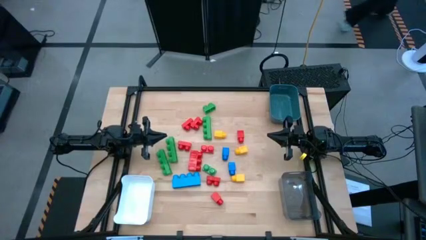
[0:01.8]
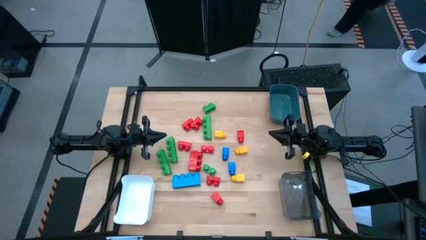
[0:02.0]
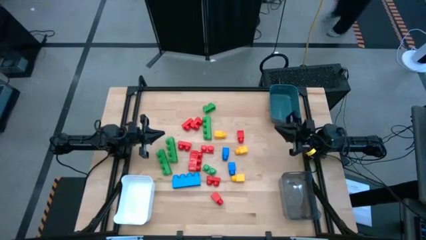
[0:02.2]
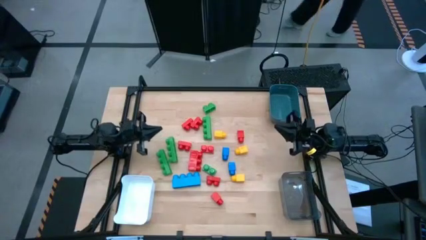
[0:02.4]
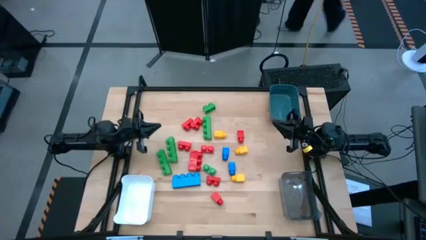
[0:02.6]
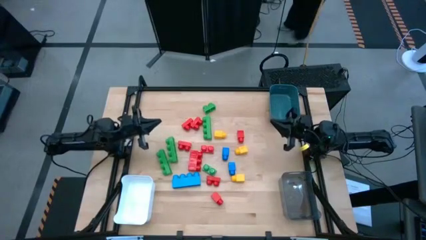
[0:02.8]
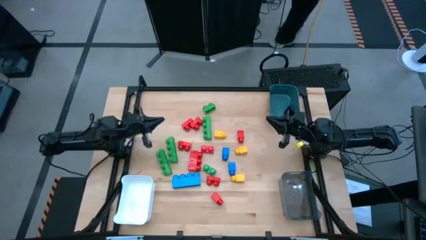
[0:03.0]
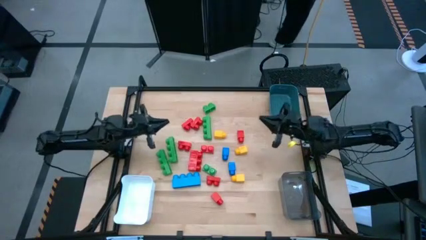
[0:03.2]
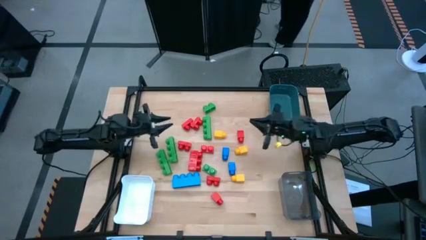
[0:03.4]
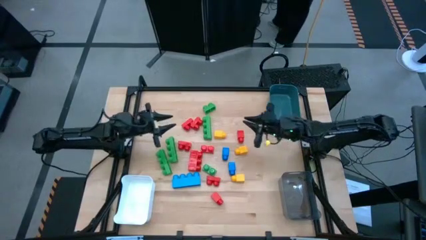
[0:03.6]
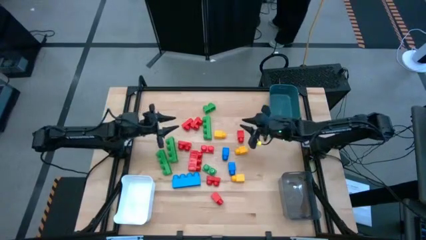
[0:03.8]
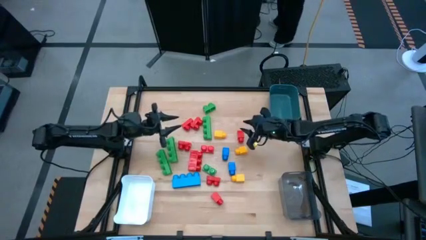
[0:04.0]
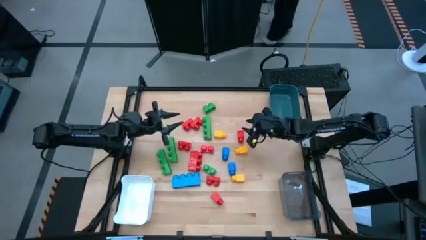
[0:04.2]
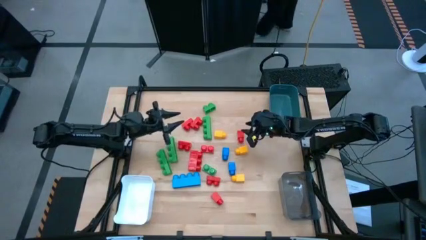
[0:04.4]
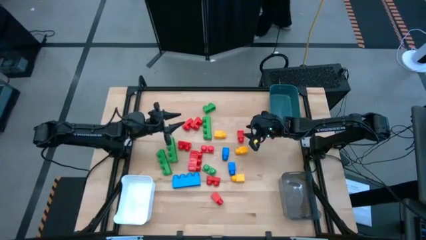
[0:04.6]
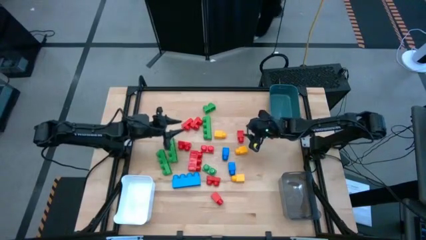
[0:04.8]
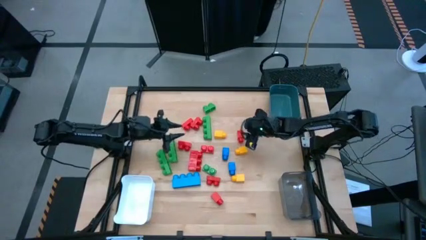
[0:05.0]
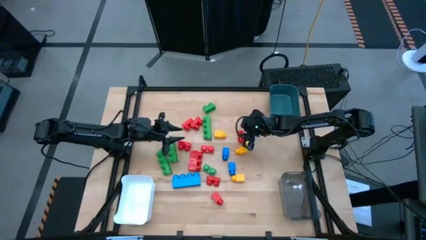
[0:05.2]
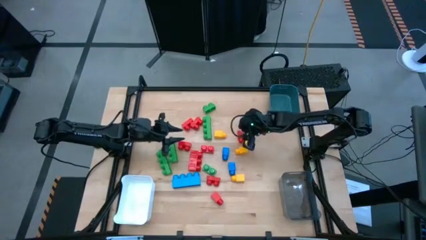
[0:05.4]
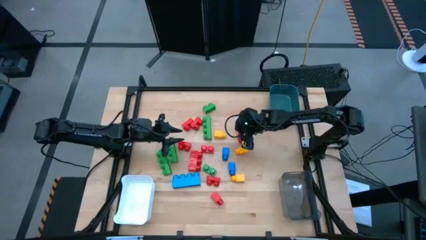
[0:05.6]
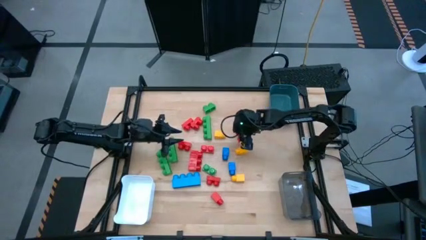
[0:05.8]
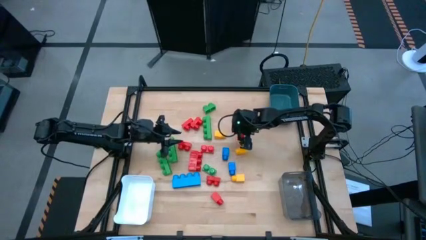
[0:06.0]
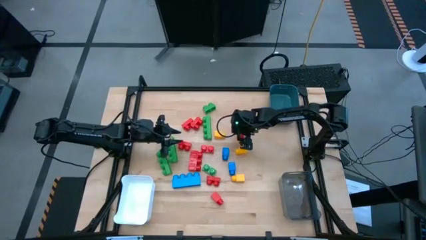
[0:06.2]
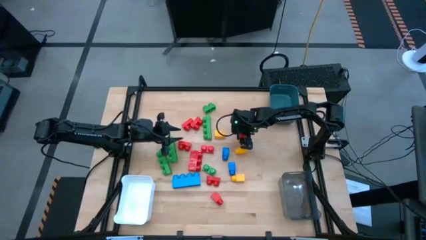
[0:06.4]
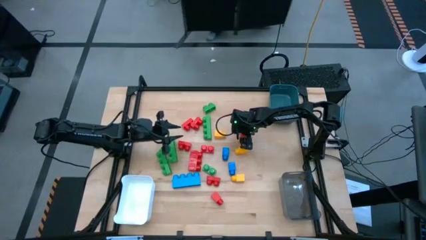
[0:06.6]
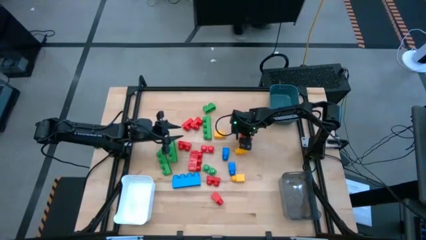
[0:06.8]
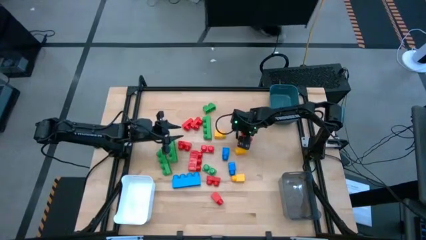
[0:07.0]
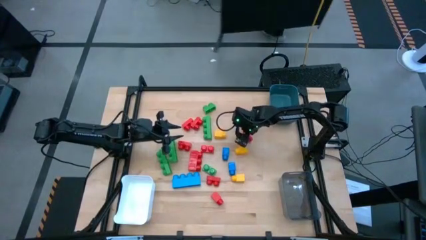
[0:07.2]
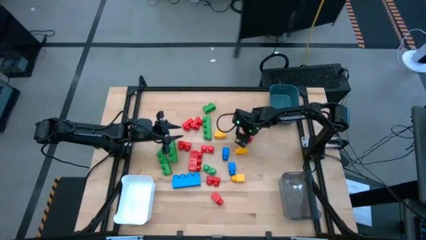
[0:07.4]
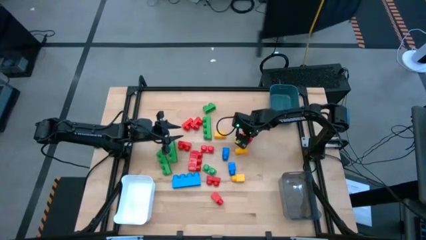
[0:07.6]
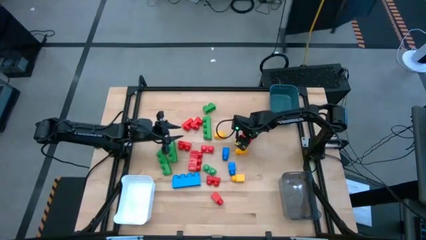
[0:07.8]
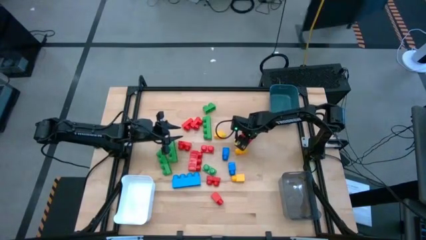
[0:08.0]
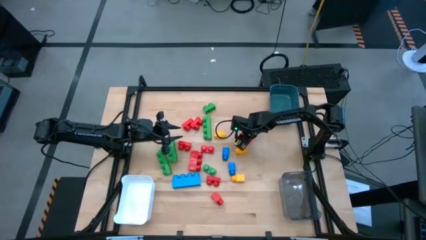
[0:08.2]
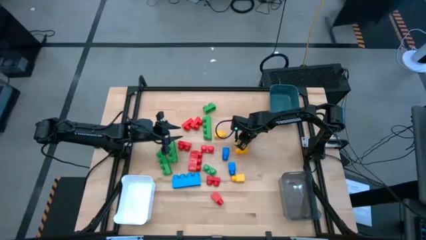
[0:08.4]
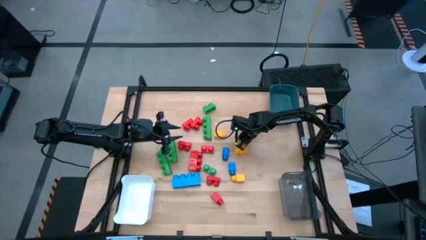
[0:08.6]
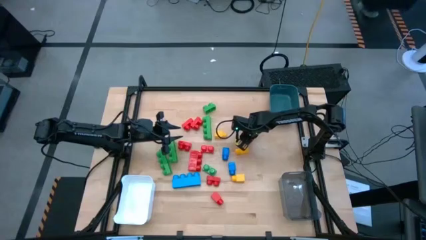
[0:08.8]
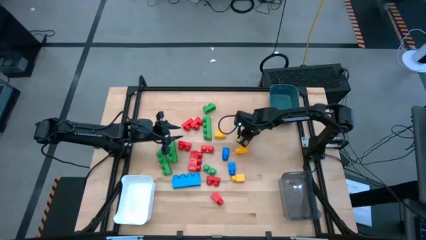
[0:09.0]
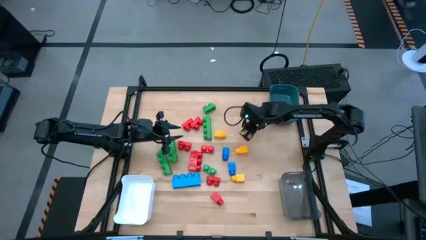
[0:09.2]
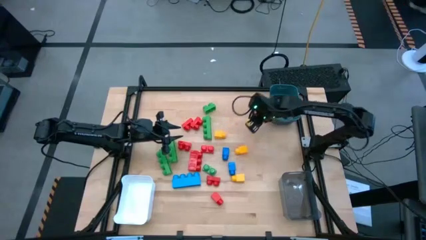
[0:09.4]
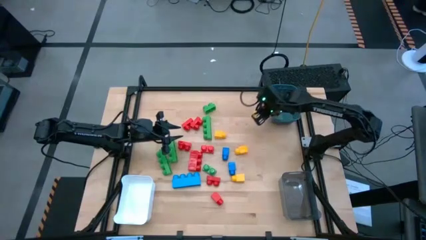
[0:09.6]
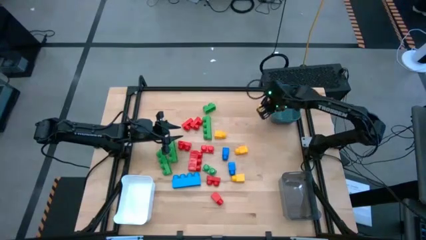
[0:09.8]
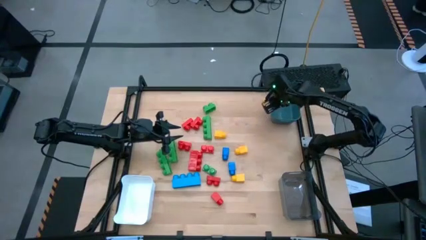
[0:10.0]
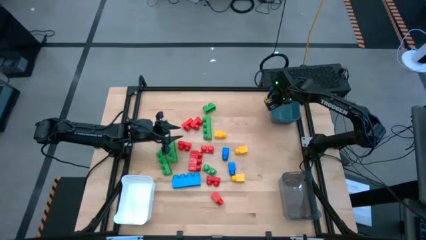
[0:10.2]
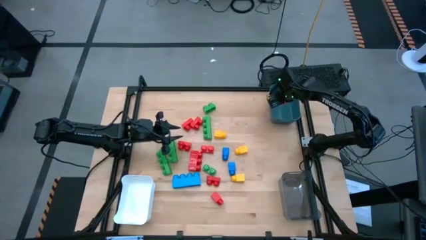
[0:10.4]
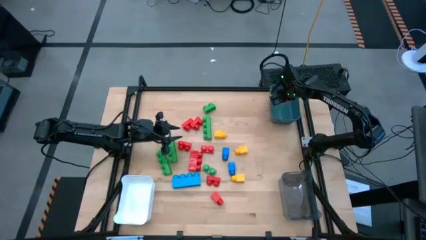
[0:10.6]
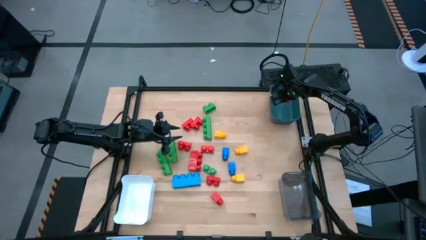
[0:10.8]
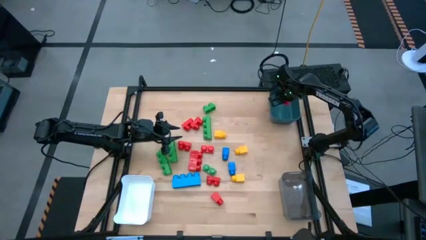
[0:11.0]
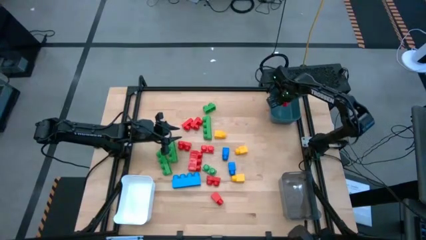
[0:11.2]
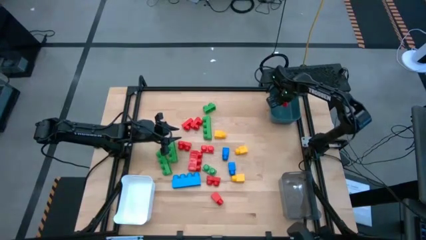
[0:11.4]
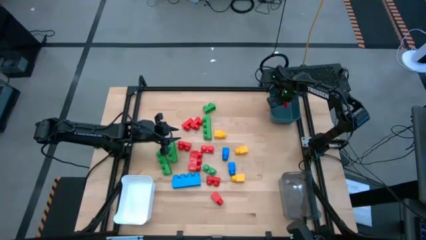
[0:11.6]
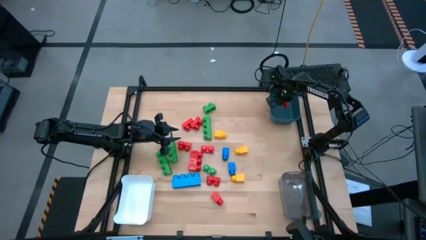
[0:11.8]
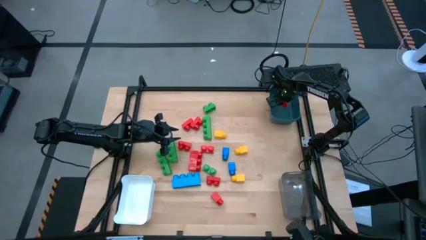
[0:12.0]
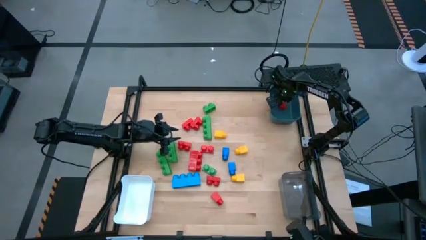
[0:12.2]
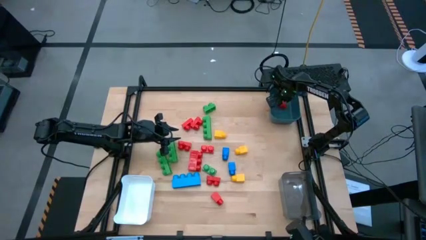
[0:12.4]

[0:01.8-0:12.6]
Task: Sort blocks by size
Put the one stud red game piece into the blue bin

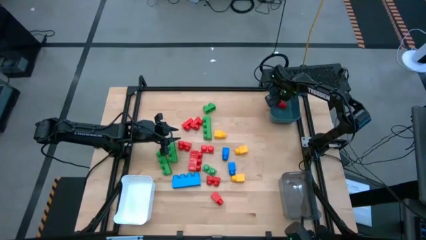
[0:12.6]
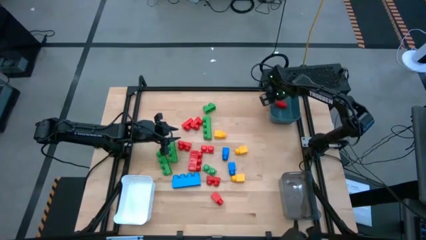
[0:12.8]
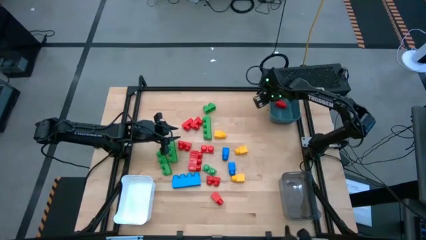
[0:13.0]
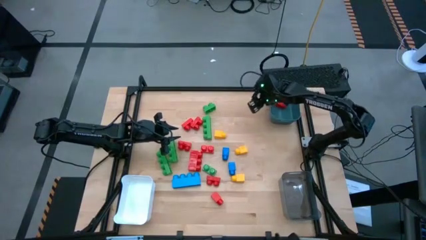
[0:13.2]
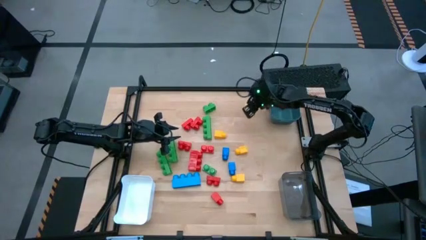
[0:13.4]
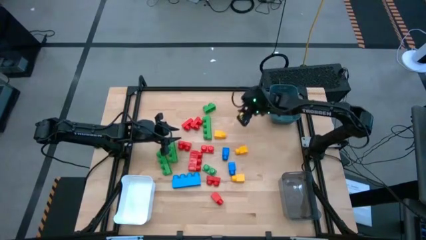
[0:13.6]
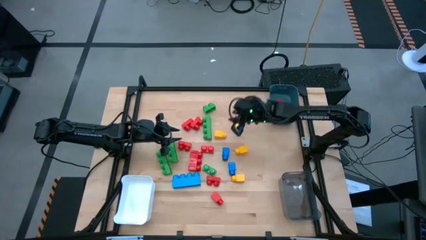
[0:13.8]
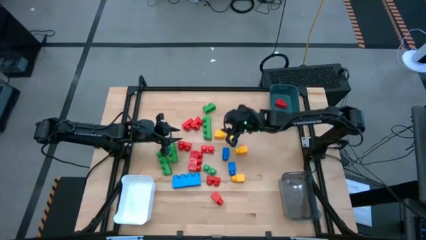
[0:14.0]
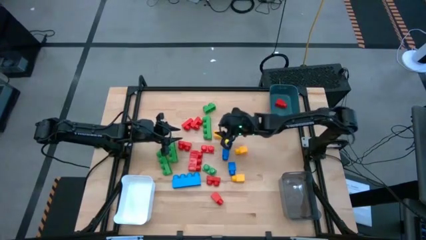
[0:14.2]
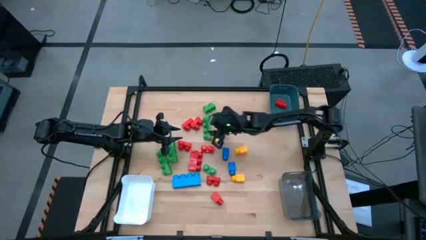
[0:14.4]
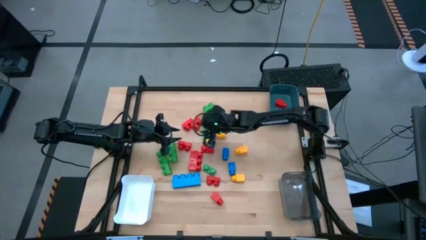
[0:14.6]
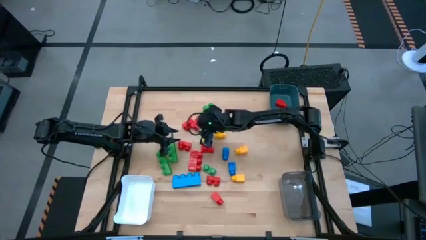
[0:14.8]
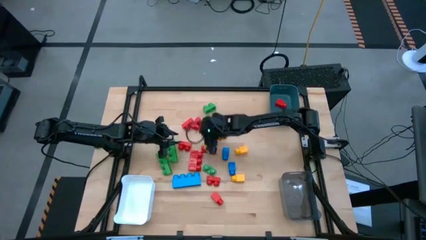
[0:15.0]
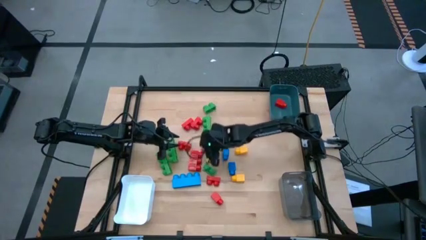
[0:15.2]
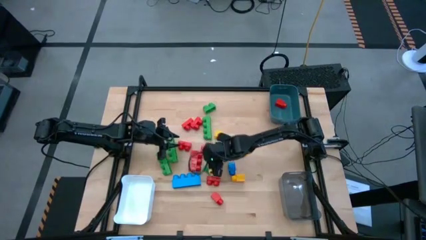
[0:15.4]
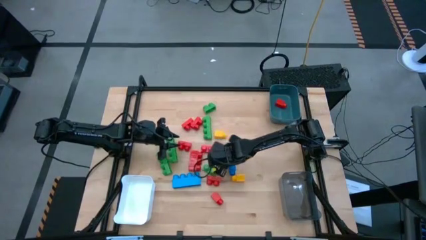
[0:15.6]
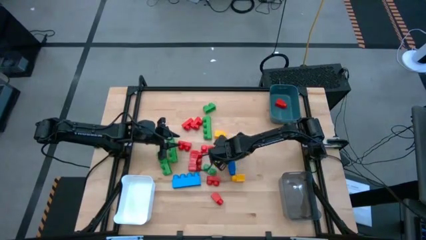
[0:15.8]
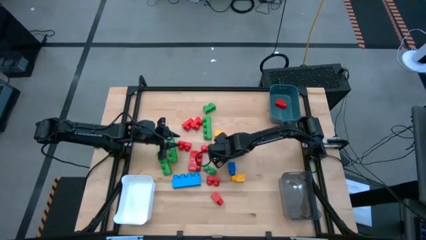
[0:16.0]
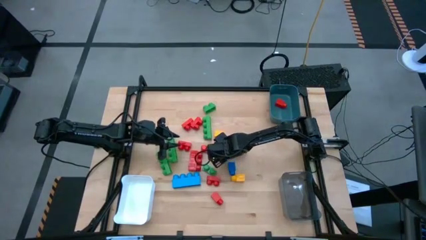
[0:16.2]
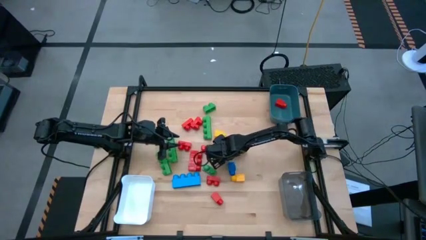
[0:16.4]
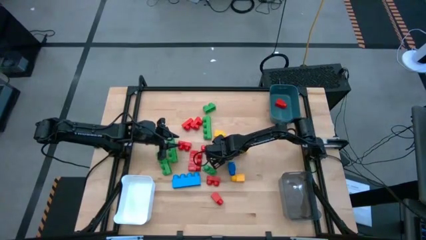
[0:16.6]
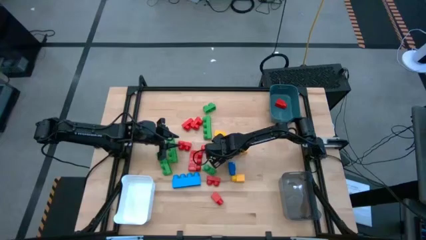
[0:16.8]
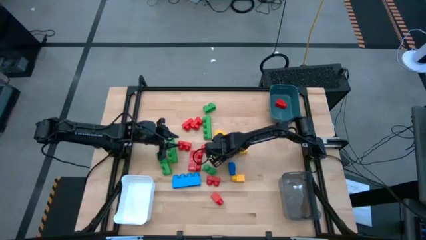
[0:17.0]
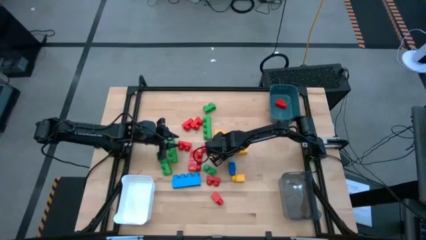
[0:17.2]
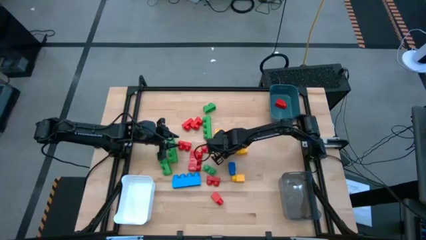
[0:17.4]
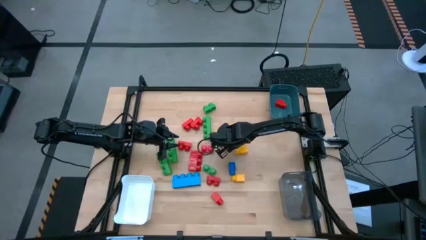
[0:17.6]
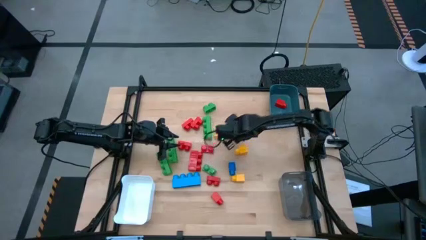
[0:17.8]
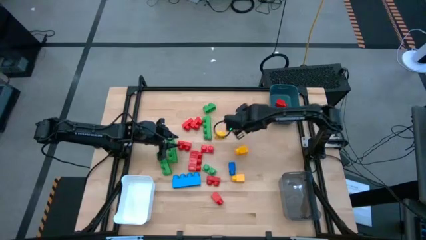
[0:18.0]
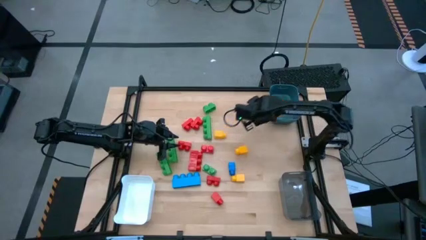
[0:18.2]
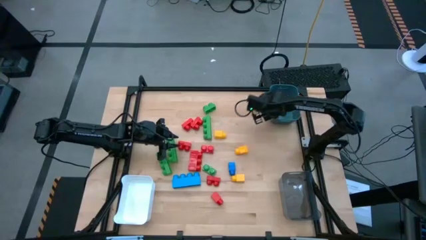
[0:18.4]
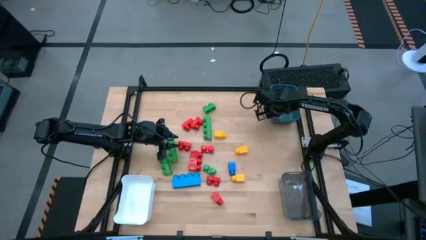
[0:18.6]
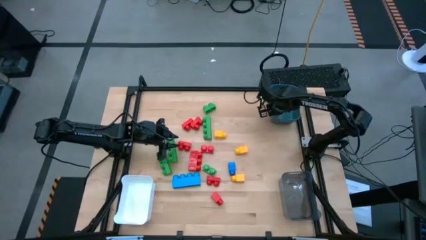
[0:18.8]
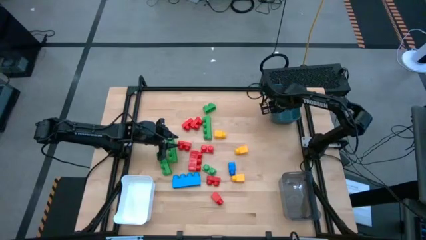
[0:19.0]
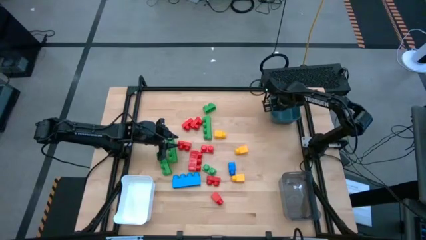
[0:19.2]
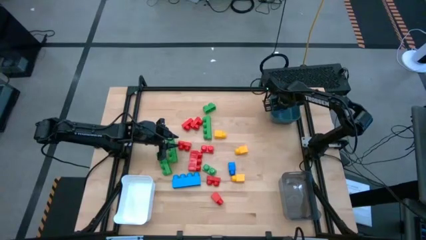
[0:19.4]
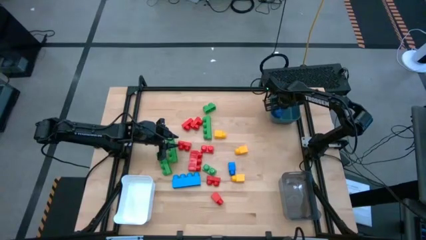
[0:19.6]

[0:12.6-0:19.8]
Put the one stud blue game piece into the blue bin
